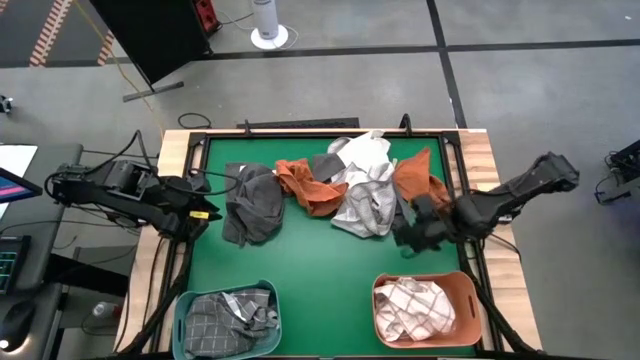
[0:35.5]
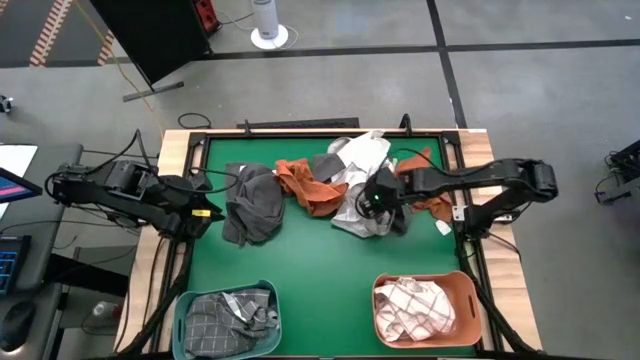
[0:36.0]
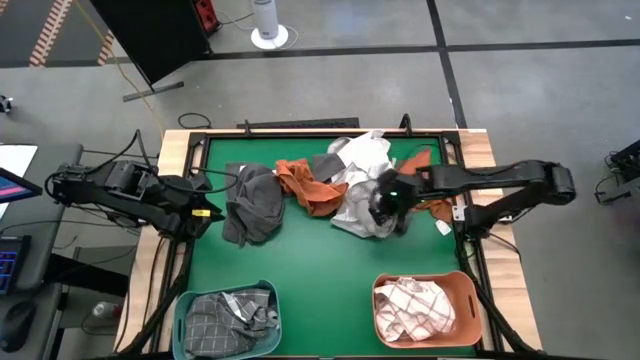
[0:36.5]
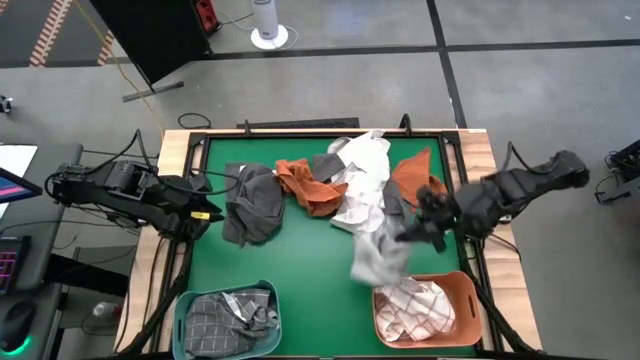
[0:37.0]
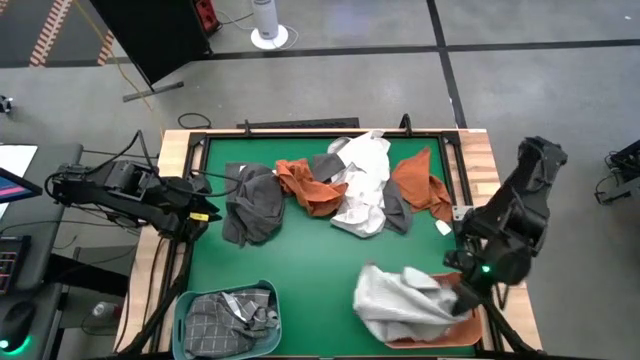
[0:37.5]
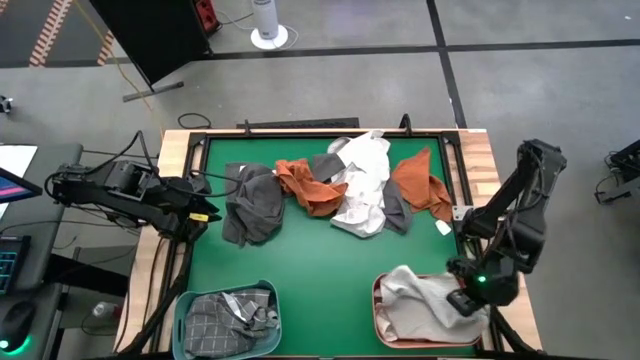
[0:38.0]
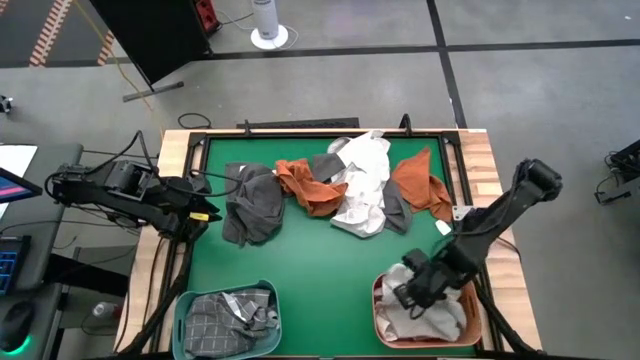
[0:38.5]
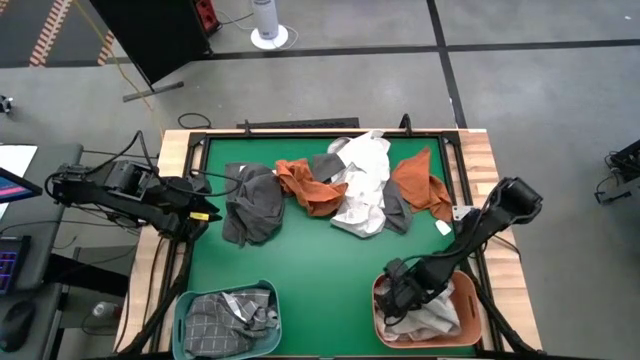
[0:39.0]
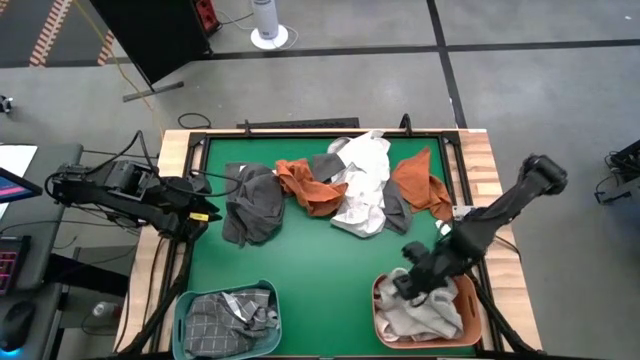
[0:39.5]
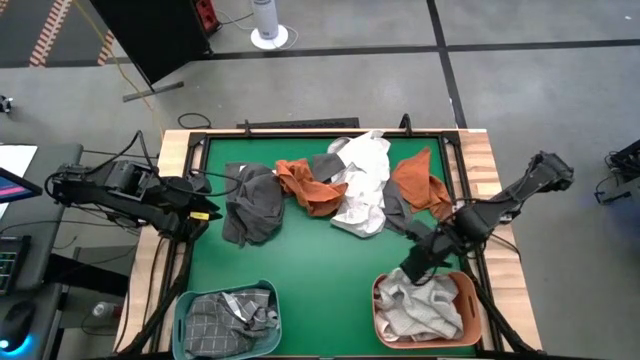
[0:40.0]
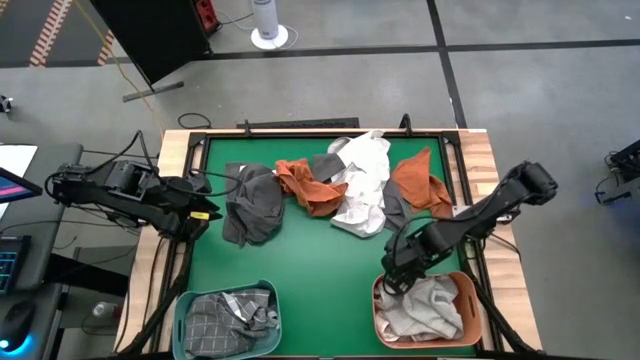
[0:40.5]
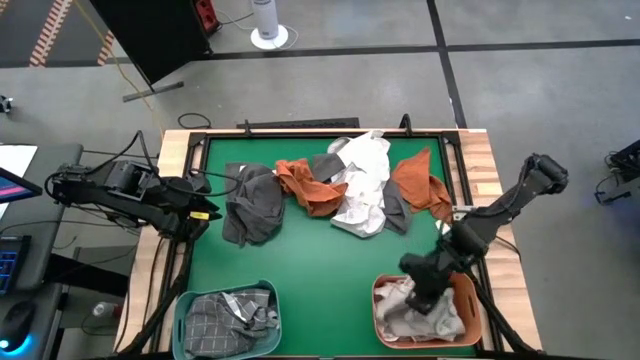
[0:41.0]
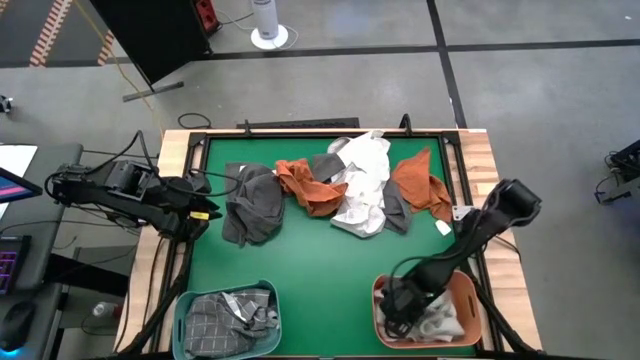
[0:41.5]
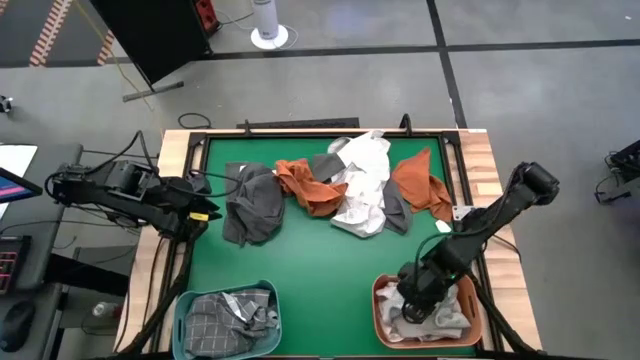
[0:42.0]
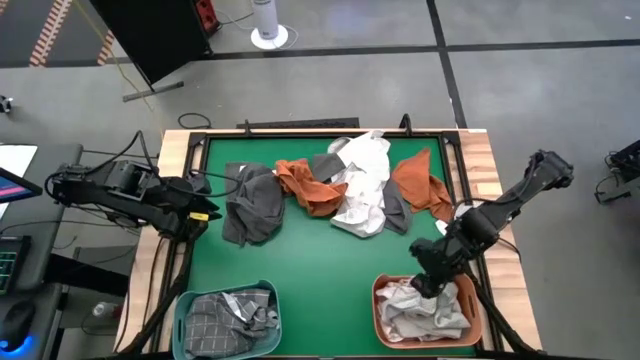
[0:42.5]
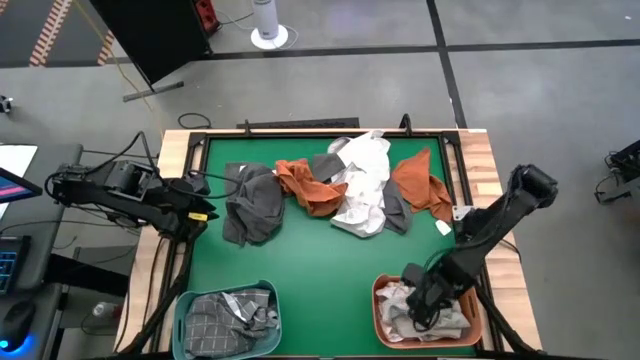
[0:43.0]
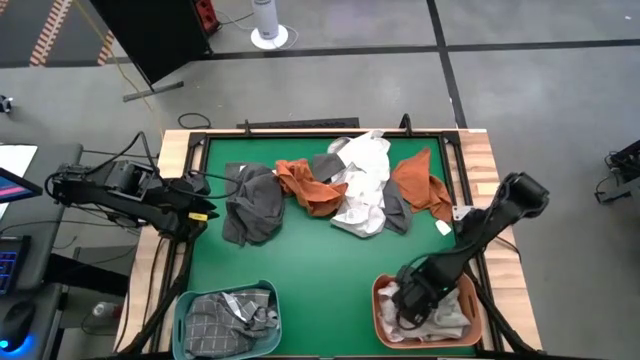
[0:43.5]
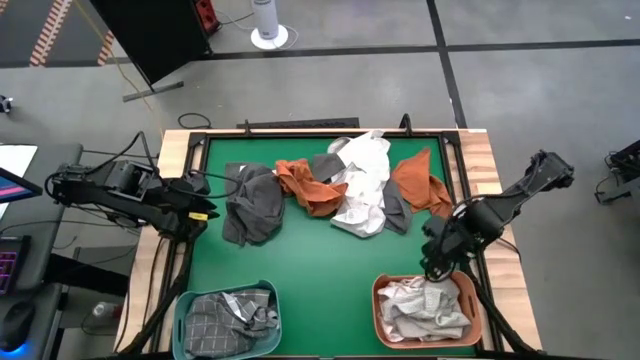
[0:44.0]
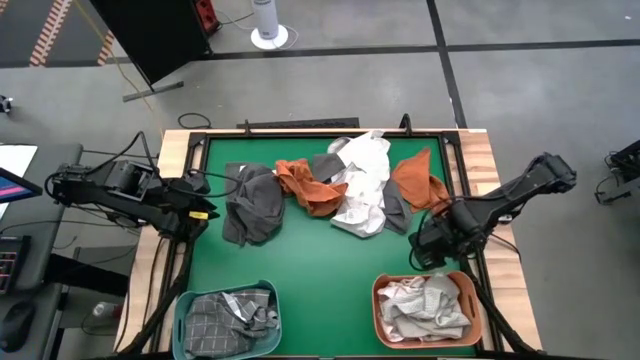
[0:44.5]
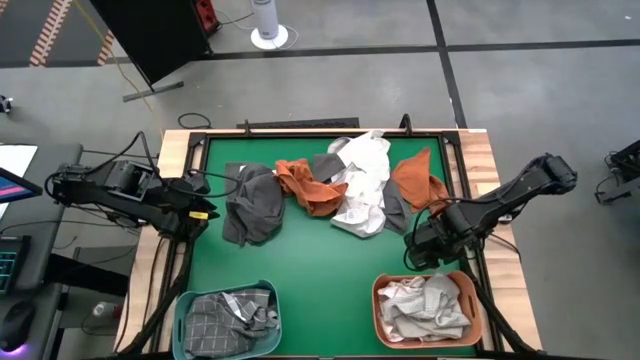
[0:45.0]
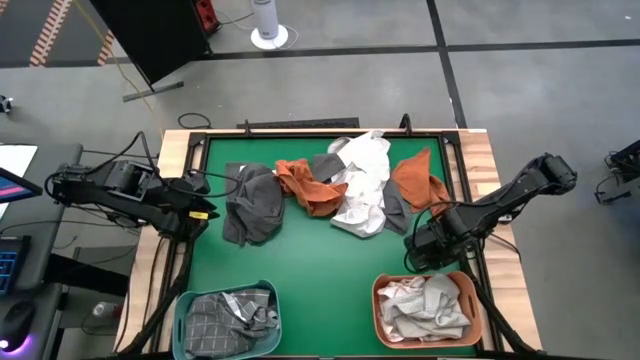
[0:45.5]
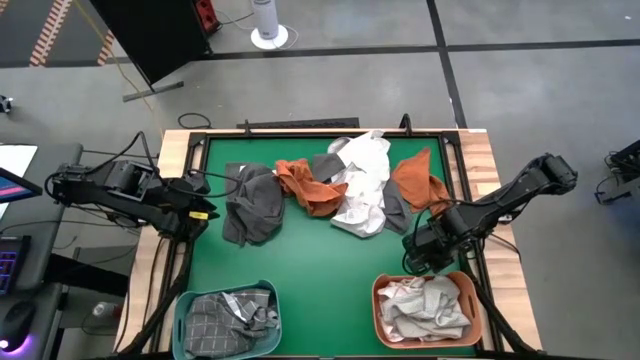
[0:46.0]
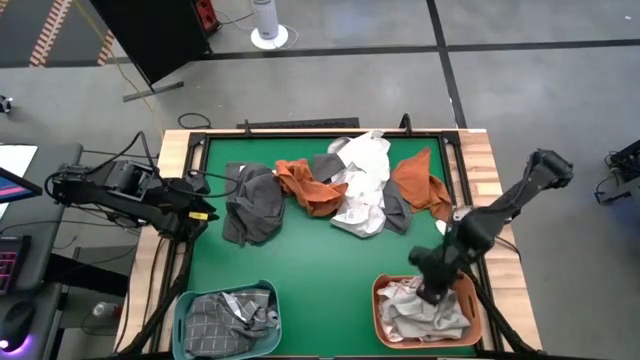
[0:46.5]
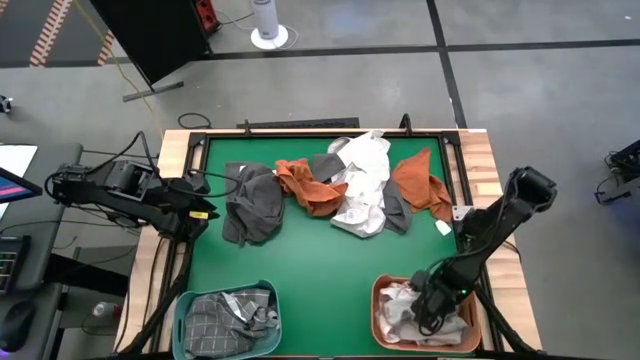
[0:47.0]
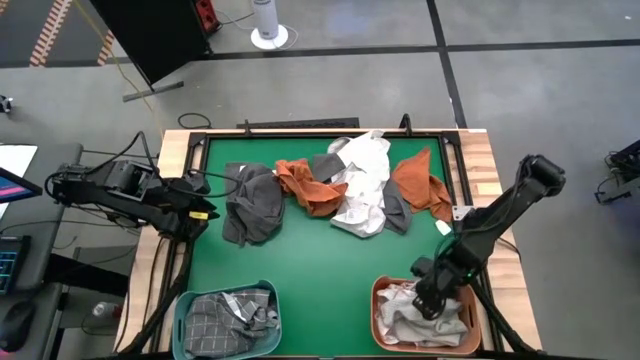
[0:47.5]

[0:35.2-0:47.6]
Task: Sort towels by color in basket
Put the bottom light gray towel into the orange bin

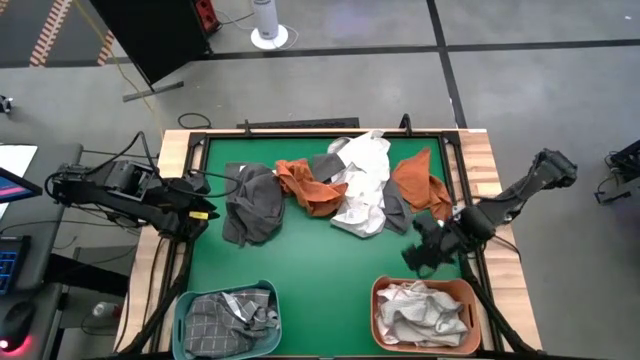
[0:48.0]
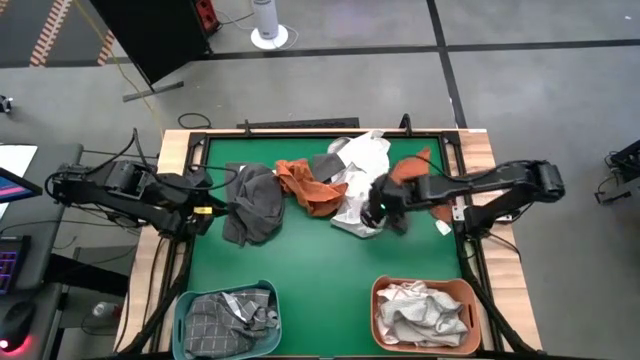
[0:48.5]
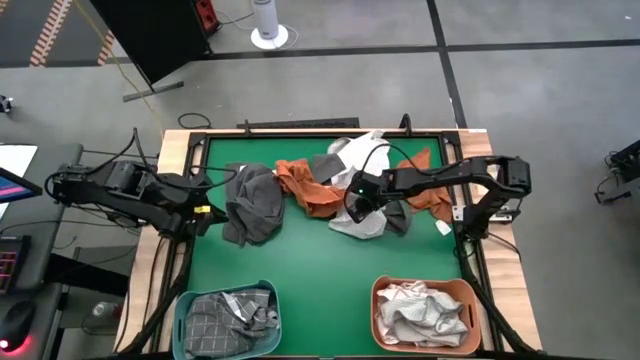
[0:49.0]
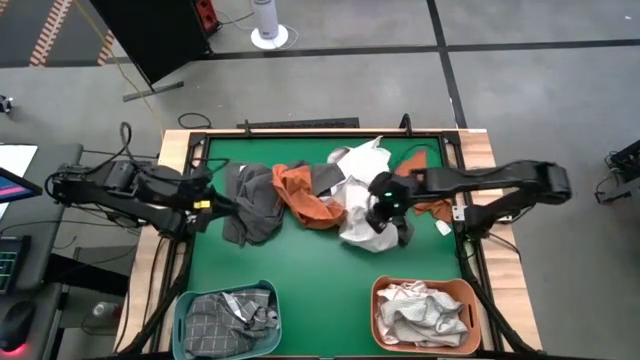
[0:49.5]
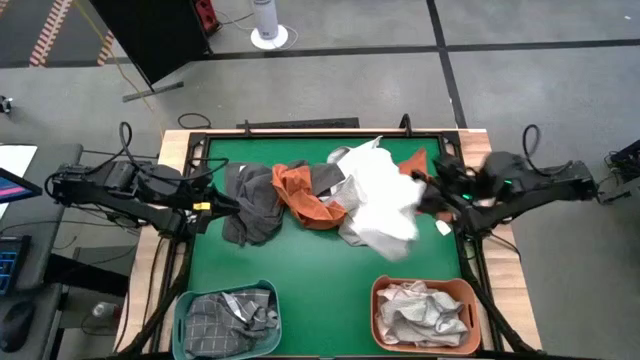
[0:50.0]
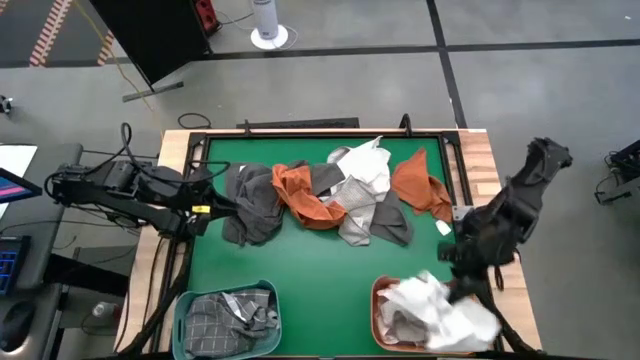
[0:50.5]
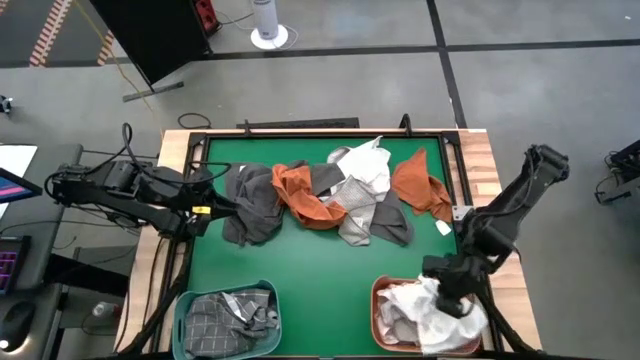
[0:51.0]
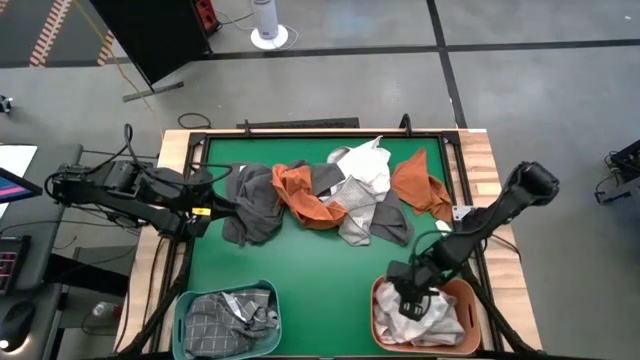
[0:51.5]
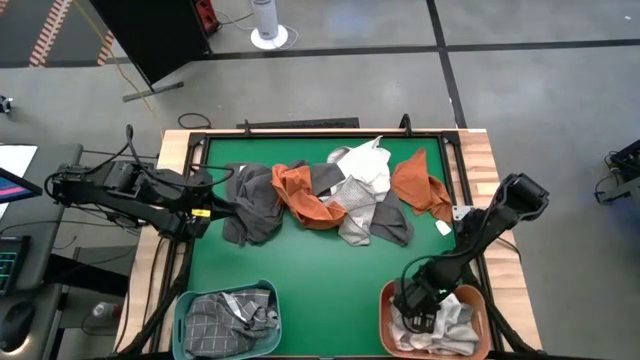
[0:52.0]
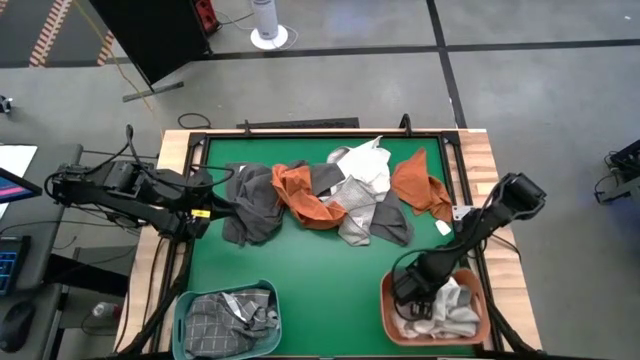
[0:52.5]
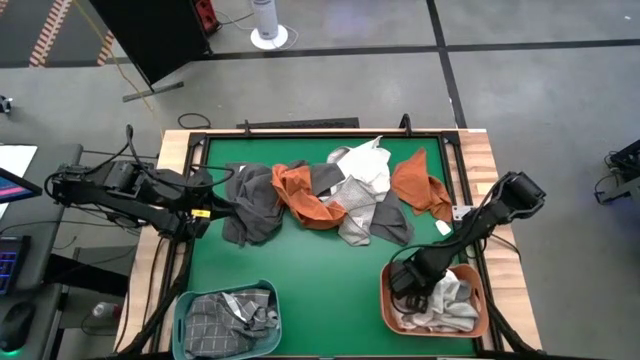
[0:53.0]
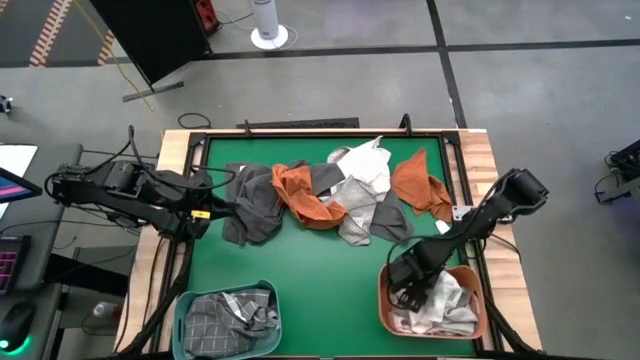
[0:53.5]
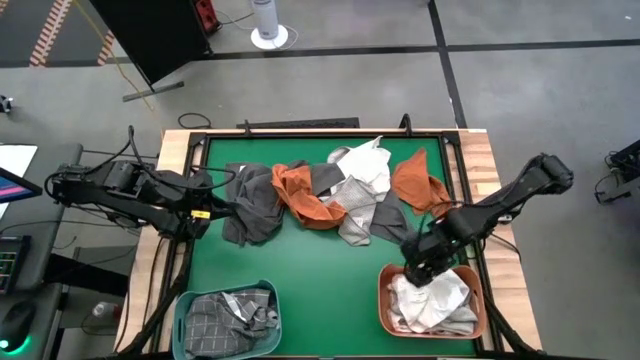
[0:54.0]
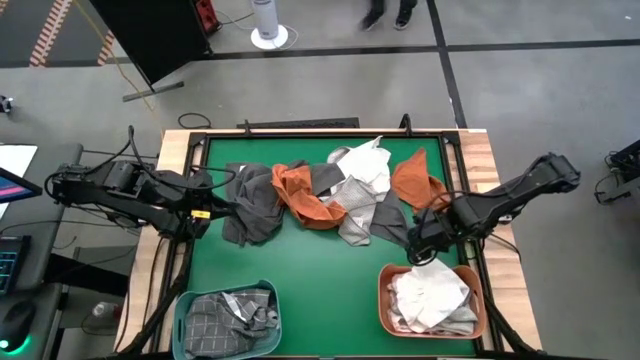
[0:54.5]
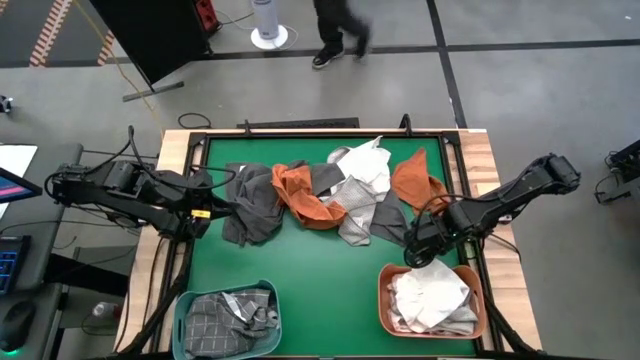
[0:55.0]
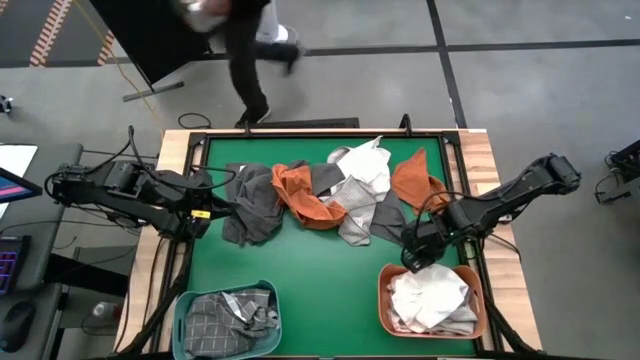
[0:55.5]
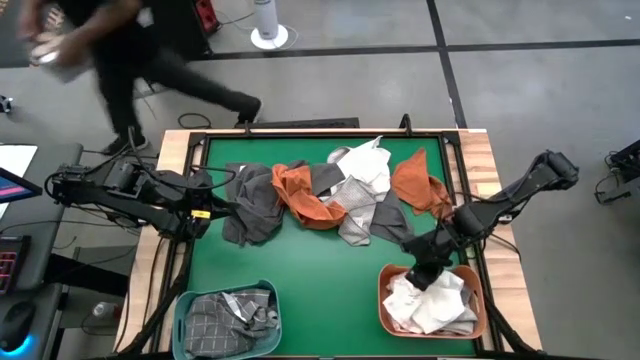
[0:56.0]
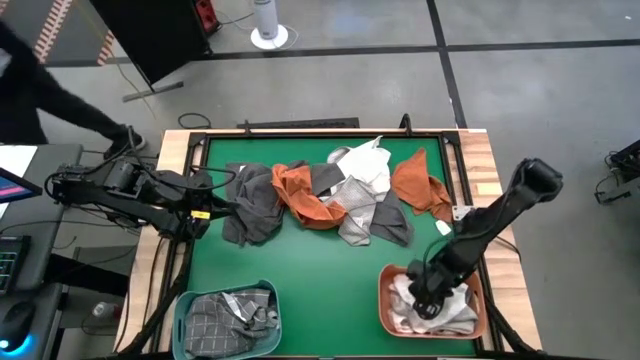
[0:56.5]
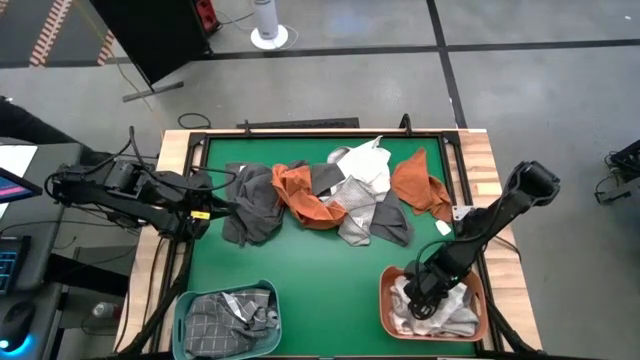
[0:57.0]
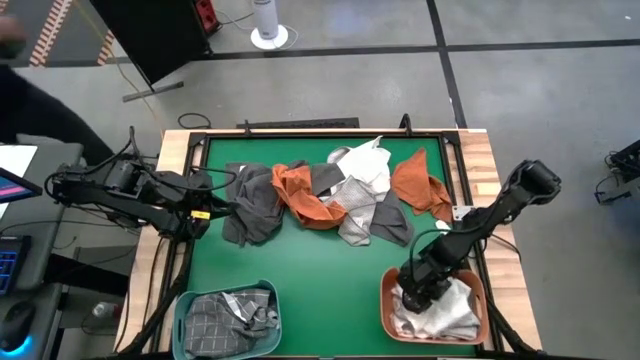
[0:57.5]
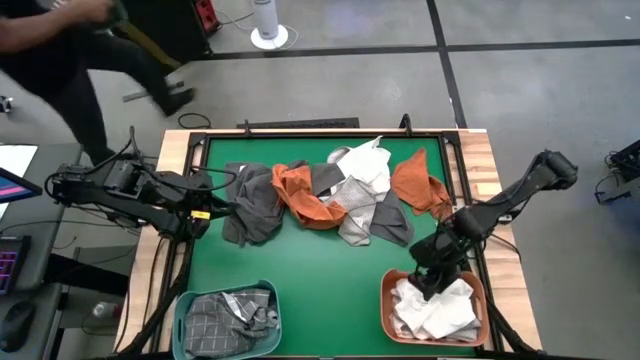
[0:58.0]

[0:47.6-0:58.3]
Put the bottom white towel into the orange bin
